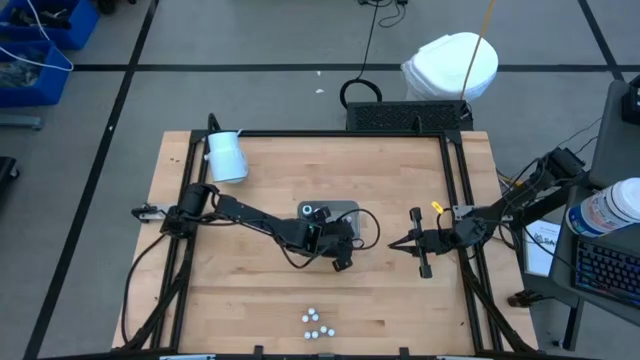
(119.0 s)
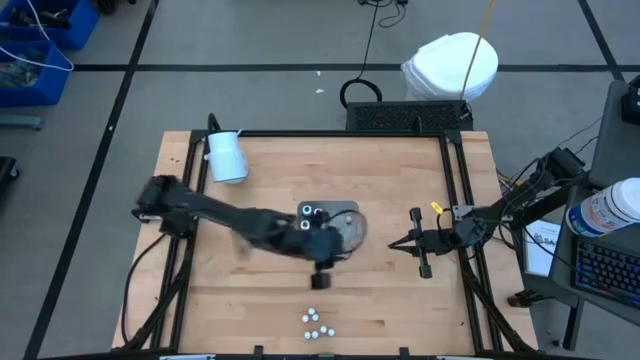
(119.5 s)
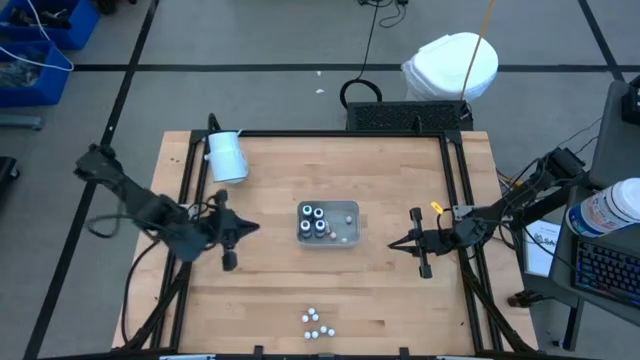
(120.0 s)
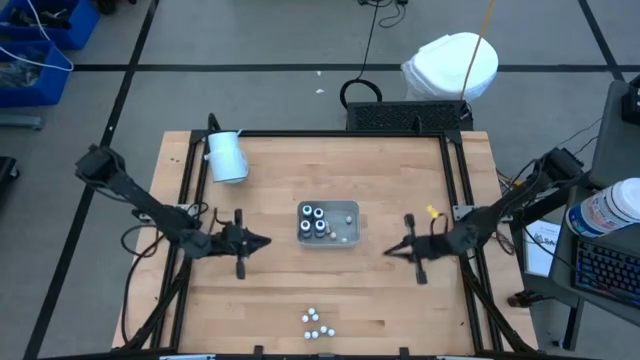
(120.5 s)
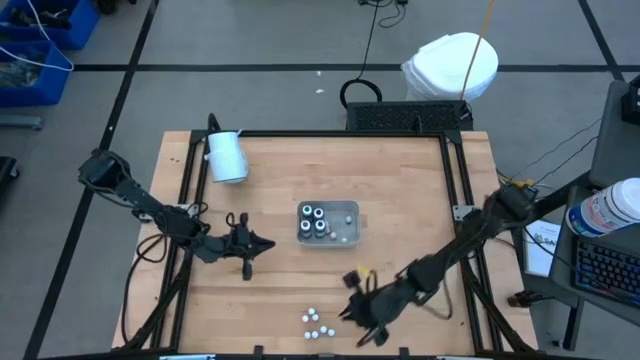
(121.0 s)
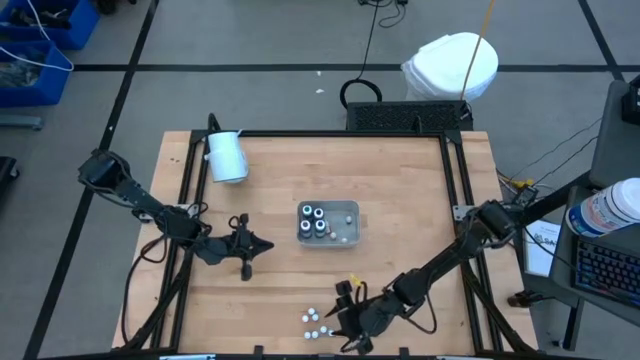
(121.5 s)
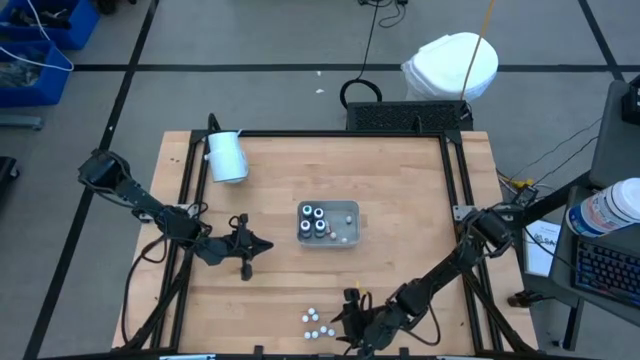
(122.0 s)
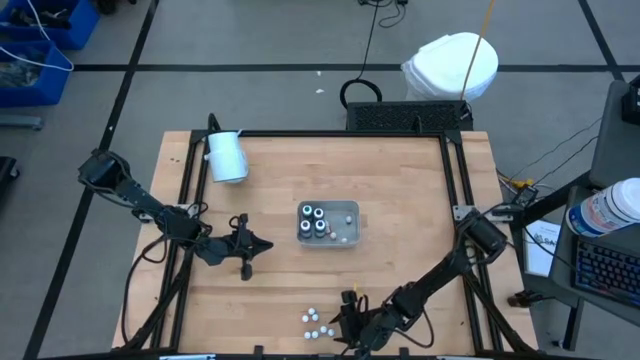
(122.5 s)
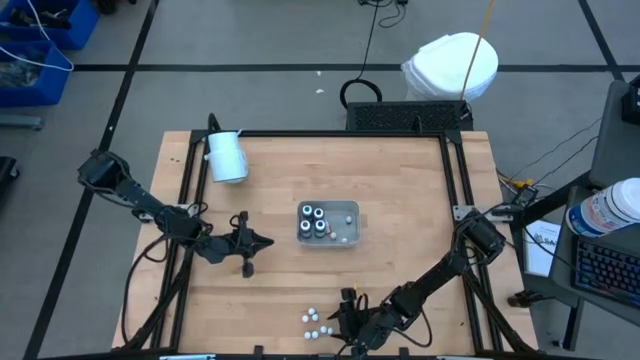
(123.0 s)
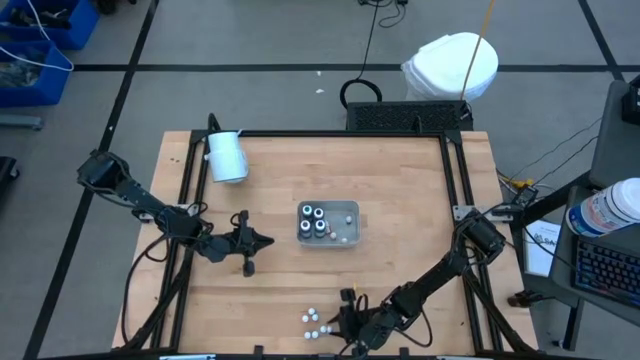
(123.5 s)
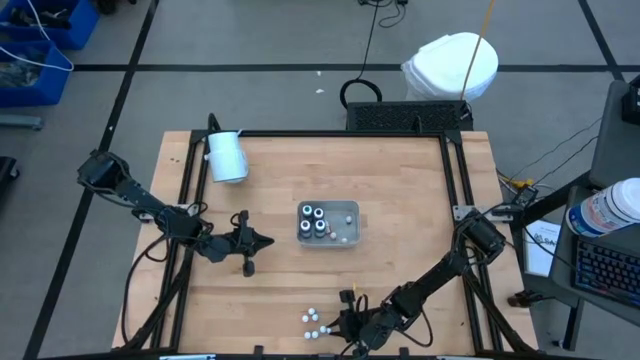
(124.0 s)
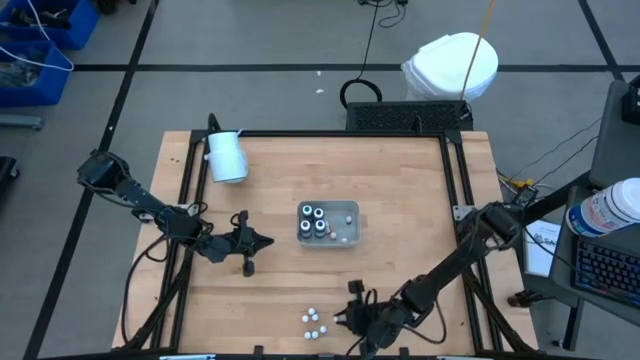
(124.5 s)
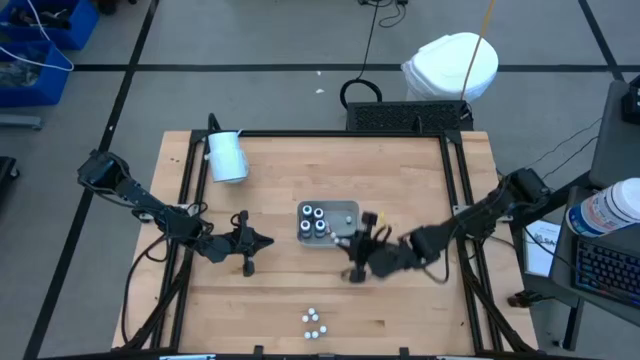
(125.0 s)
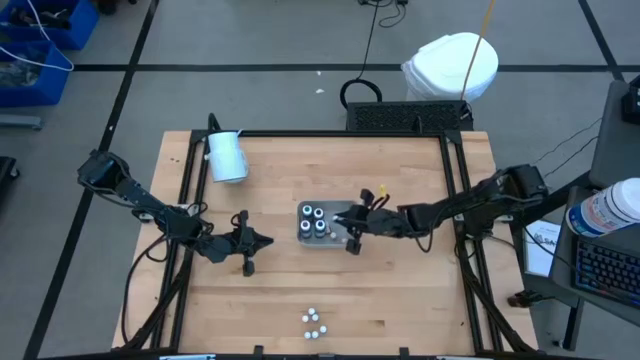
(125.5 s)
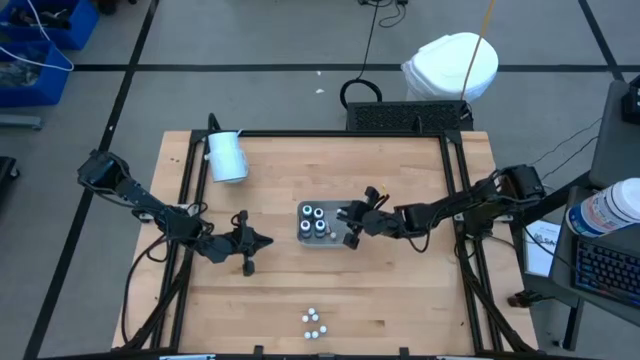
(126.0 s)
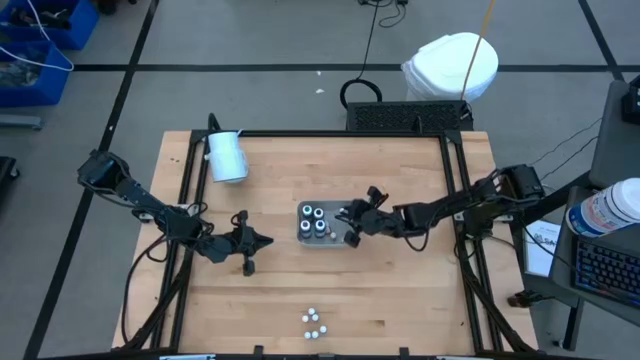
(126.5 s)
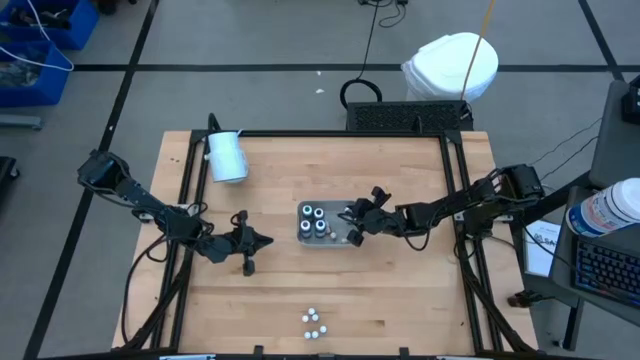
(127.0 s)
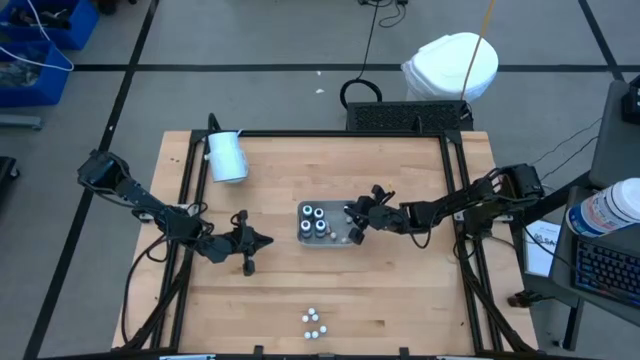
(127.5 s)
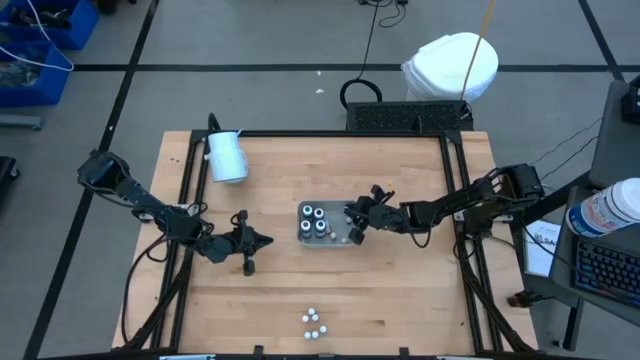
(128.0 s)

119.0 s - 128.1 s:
Task: Pick & Place food coloring
Put the small blue food coloring bottle into the gray bin

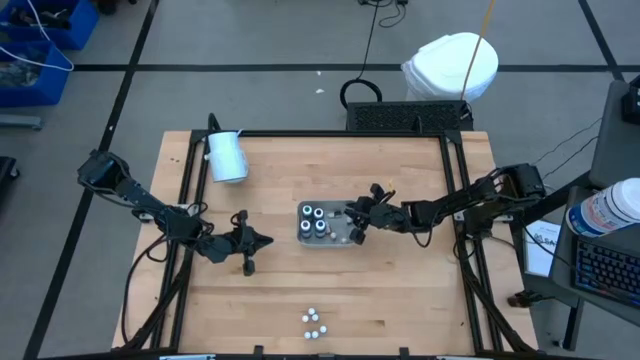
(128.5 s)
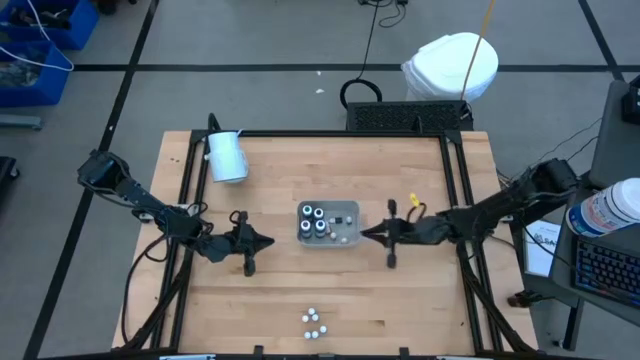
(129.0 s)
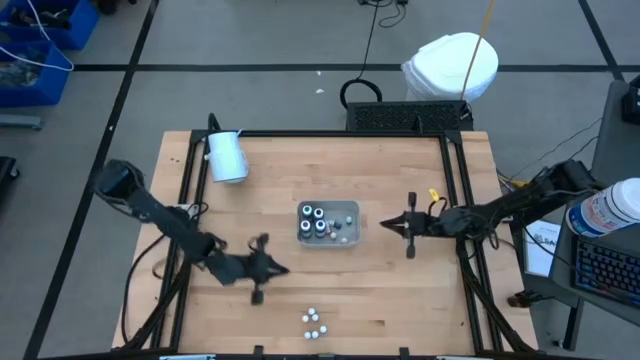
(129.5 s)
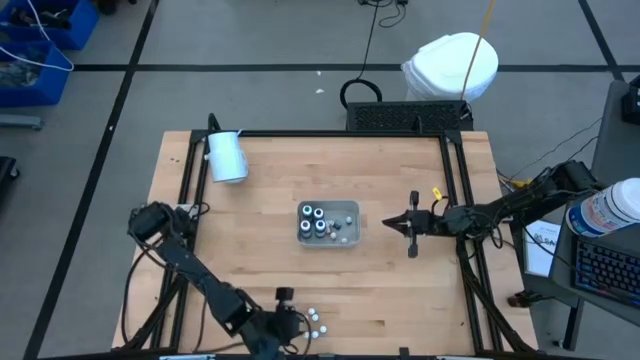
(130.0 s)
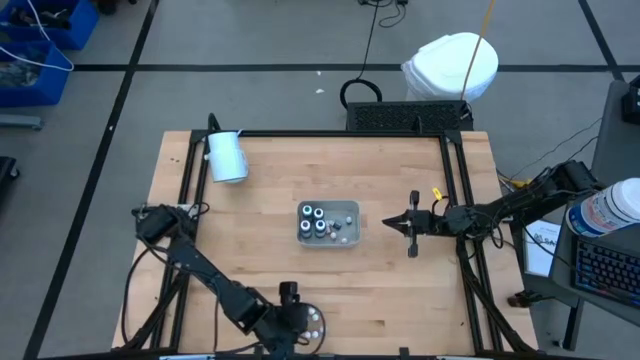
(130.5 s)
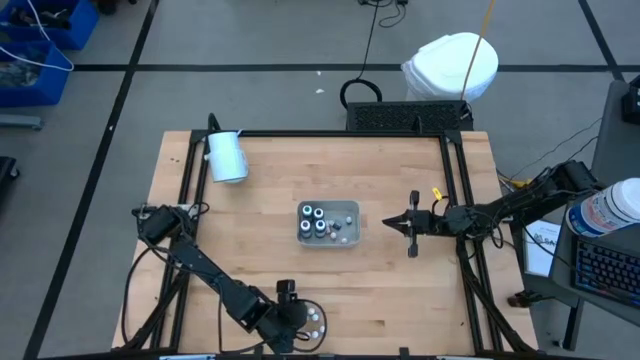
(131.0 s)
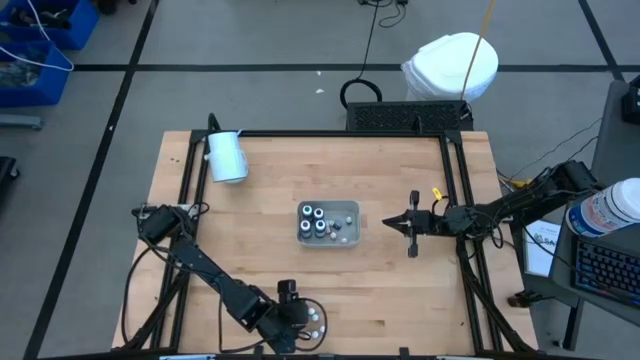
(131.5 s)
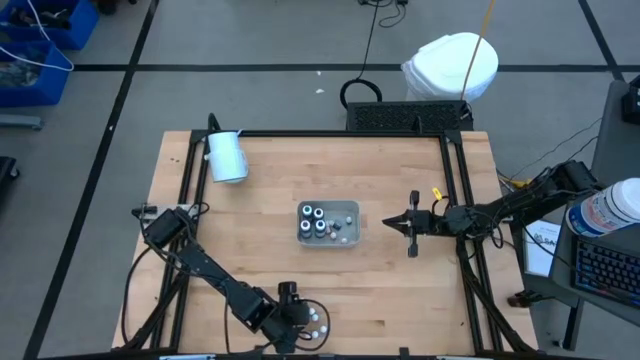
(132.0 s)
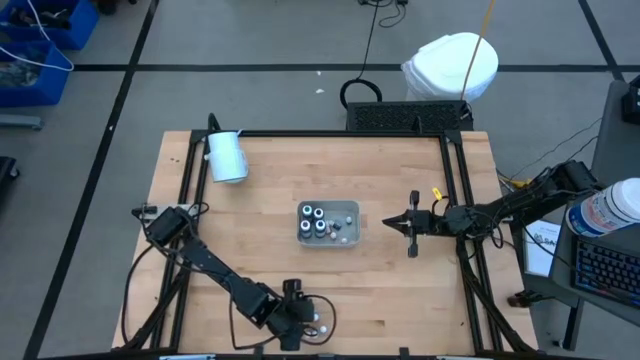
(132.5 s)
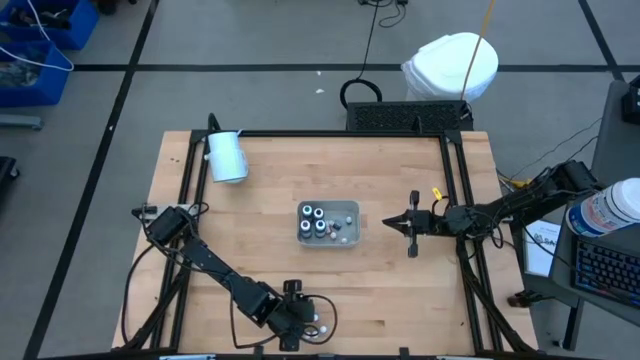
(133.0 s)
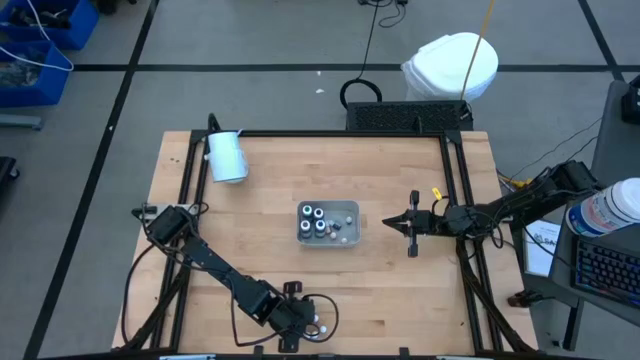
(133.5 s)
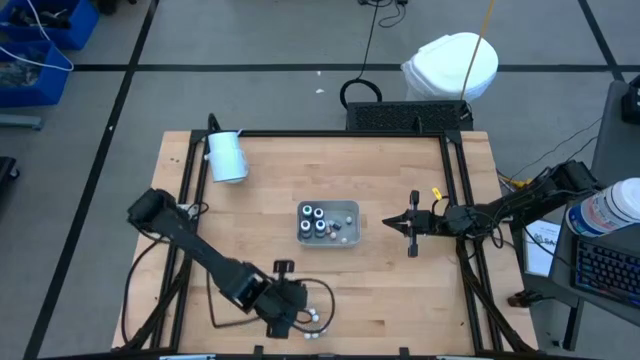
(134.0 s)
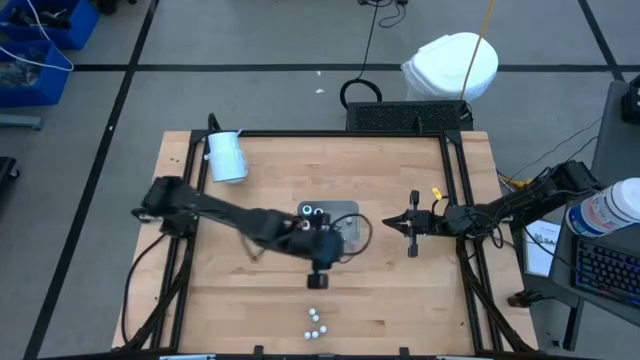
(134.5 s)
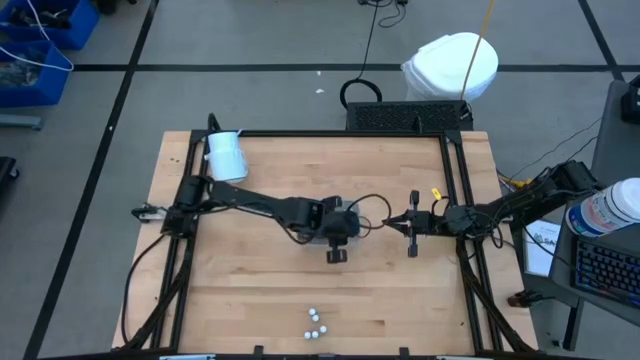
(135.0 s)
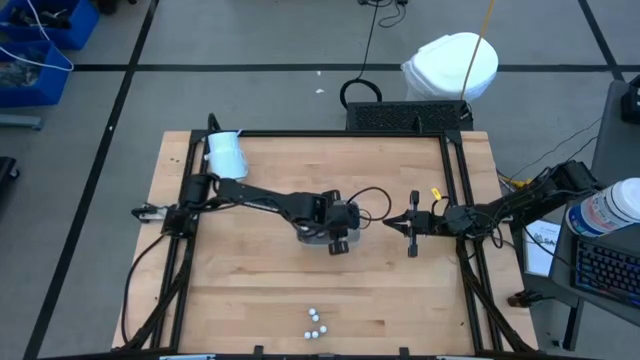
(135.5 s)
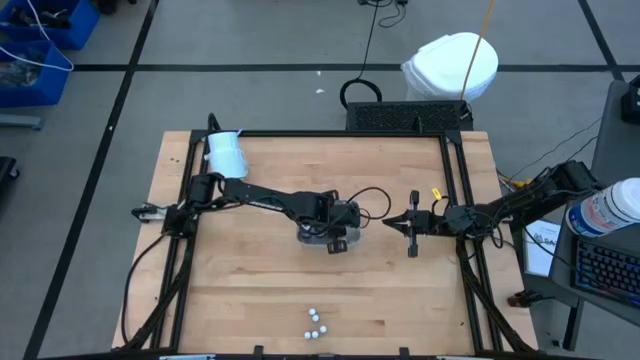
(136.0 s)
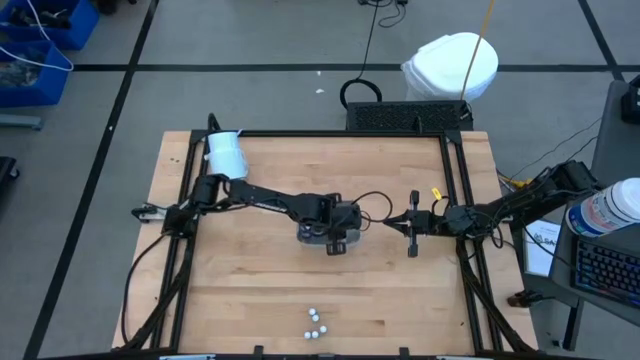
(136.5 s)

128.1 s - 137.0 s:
Put the small orange food coloring bottle into the gray bin

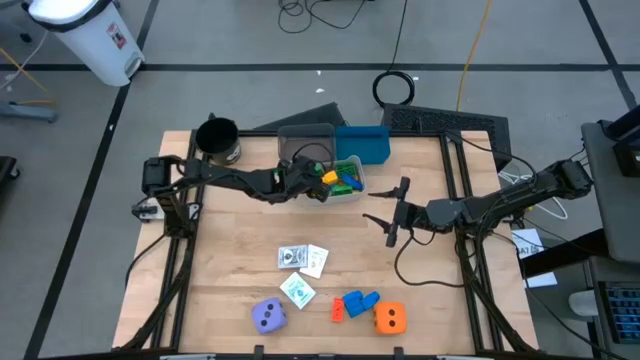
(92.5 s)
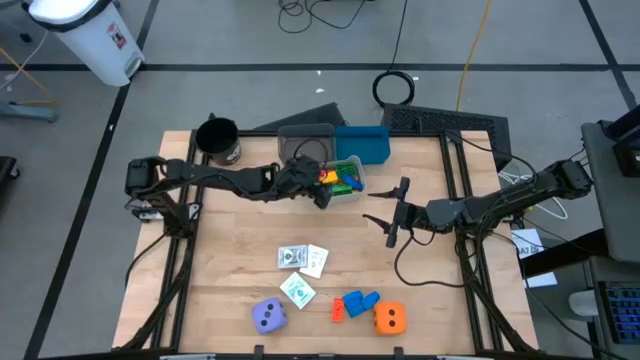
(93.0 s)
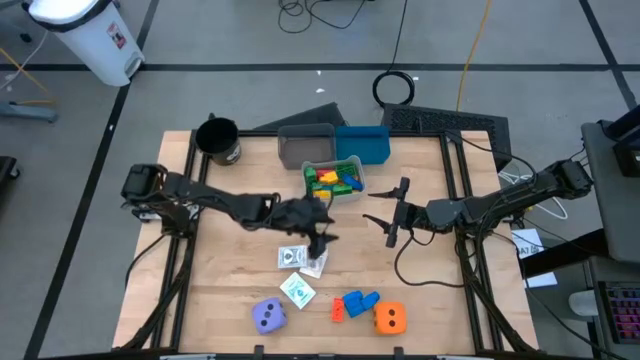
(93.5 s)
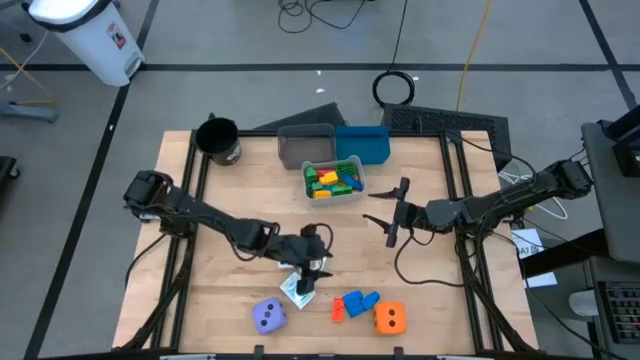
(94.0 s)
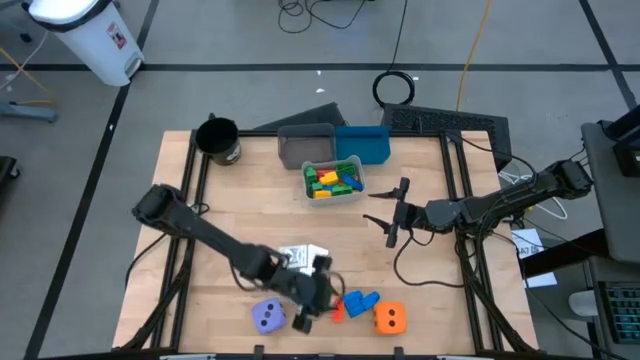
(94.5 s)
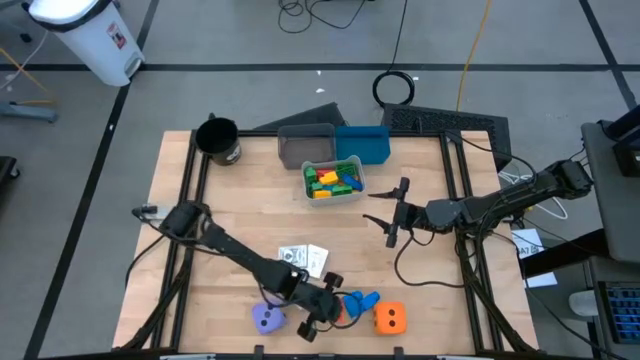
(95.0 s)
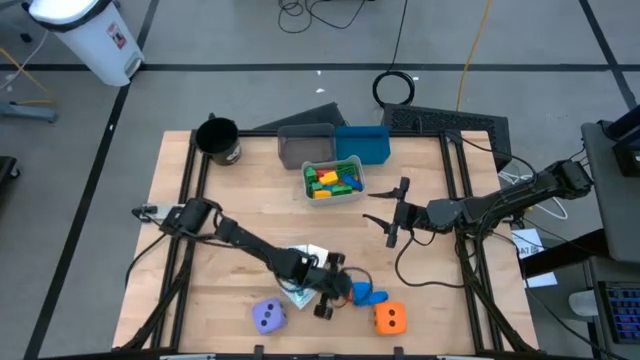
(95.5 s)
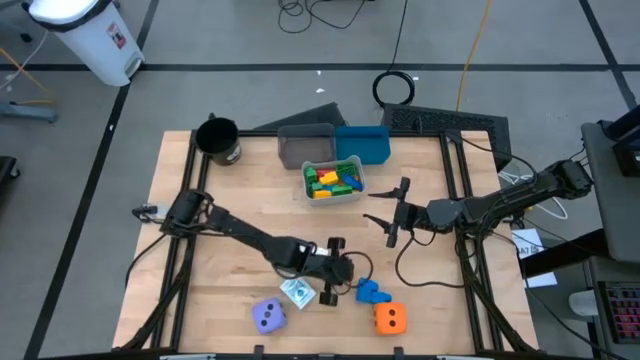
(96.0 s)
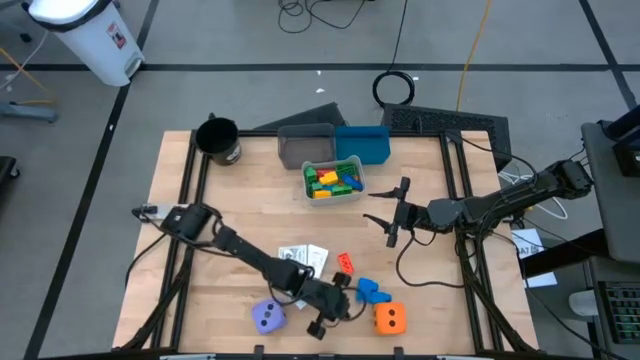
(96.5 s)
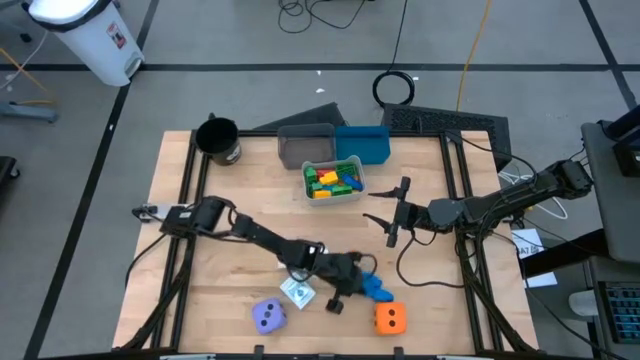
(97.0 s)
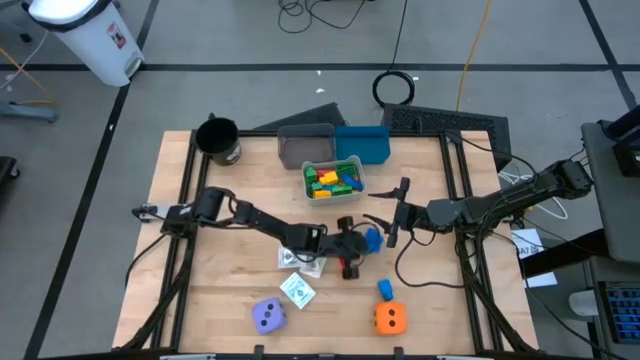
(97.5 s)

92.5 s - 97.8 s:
Task: Pick & Place Toys
Adjust the game pieces
